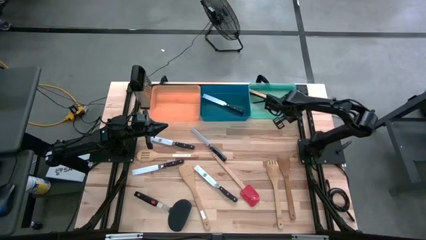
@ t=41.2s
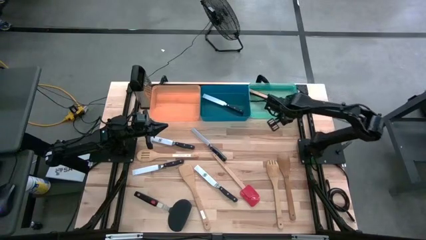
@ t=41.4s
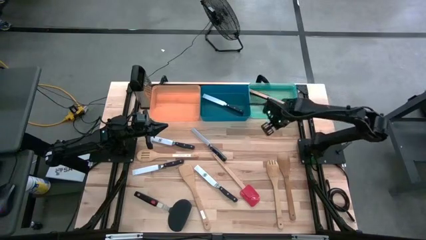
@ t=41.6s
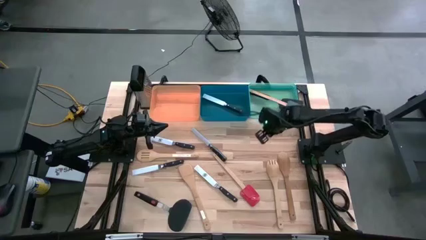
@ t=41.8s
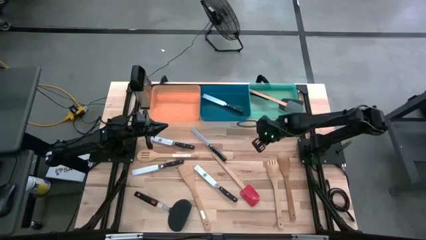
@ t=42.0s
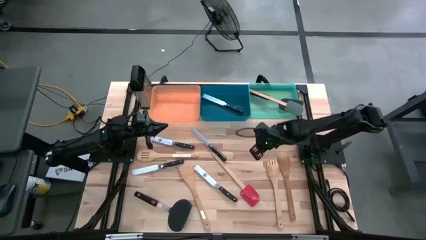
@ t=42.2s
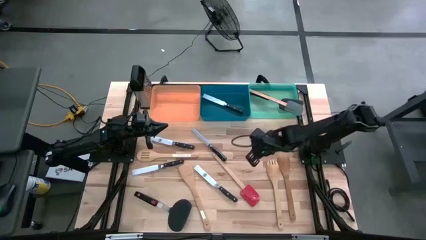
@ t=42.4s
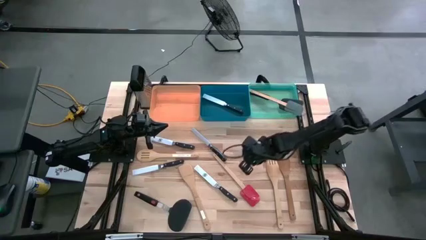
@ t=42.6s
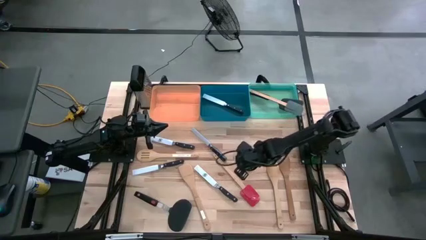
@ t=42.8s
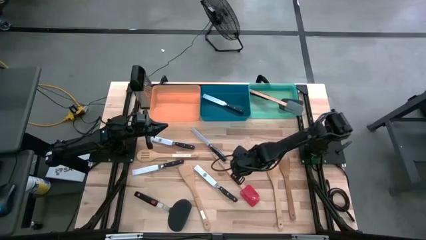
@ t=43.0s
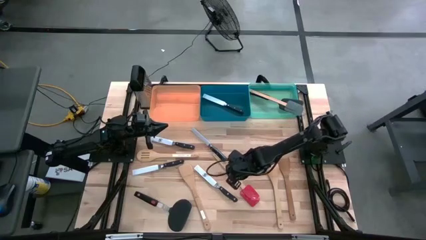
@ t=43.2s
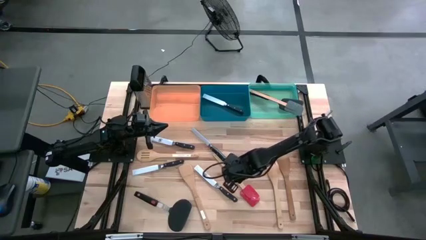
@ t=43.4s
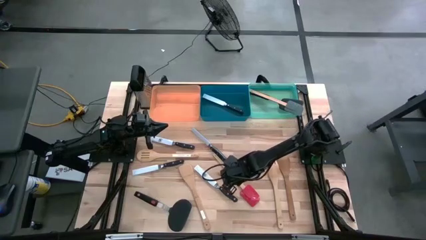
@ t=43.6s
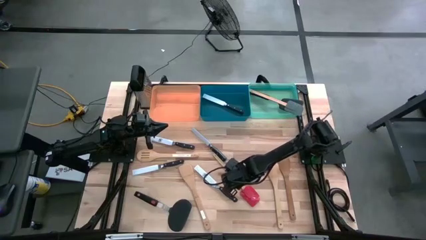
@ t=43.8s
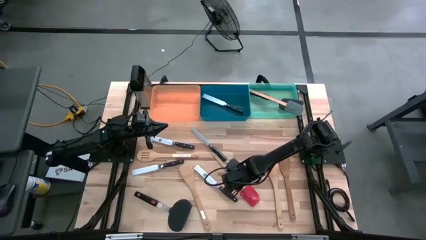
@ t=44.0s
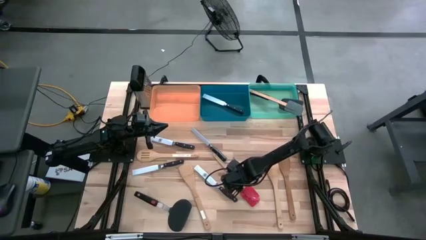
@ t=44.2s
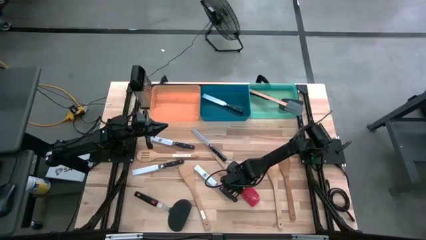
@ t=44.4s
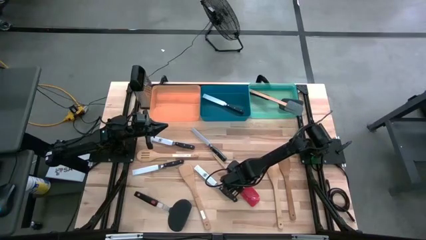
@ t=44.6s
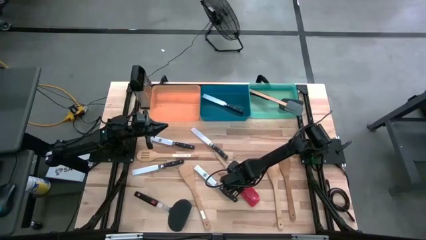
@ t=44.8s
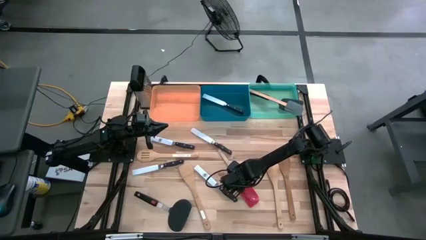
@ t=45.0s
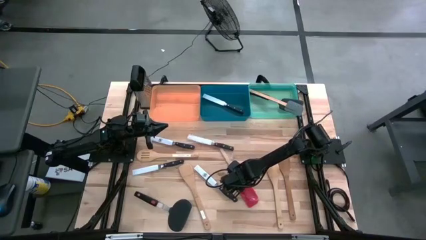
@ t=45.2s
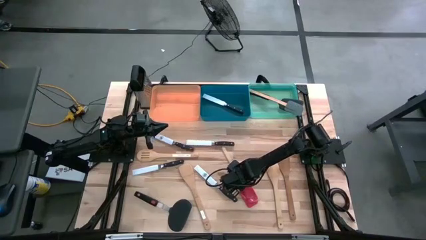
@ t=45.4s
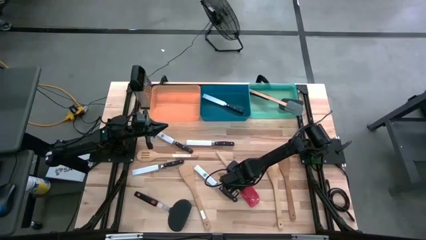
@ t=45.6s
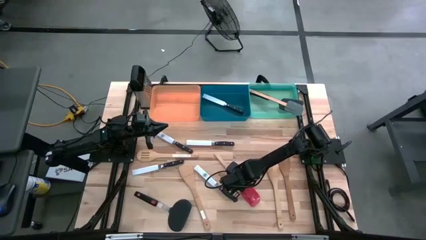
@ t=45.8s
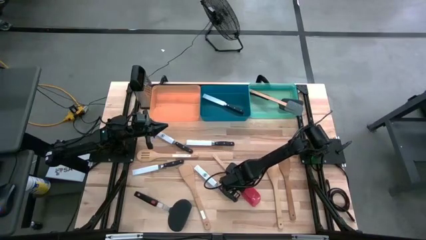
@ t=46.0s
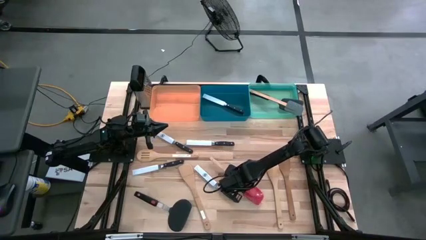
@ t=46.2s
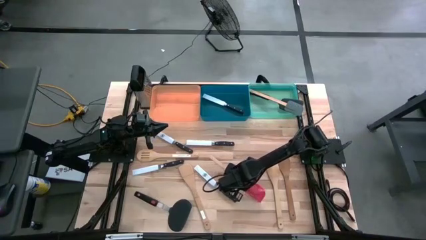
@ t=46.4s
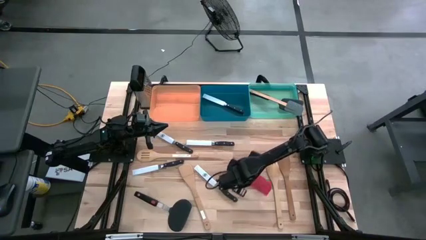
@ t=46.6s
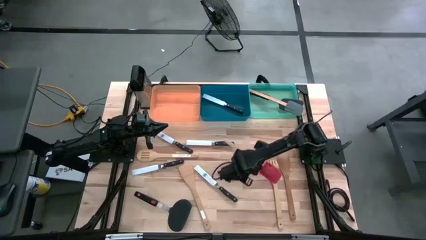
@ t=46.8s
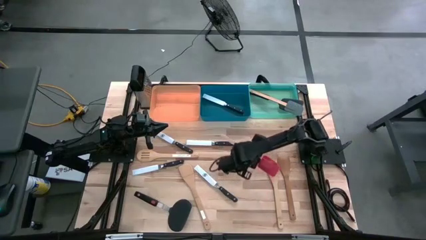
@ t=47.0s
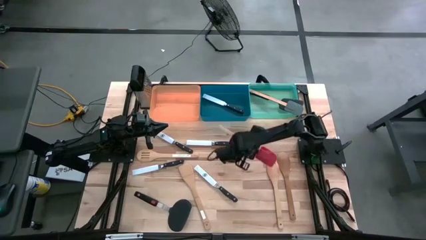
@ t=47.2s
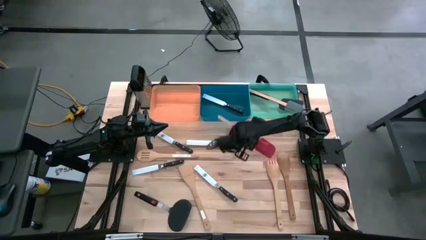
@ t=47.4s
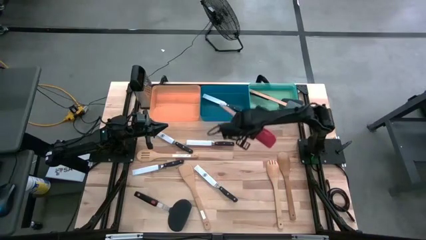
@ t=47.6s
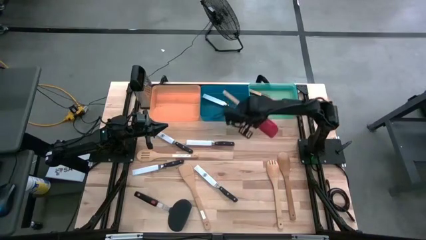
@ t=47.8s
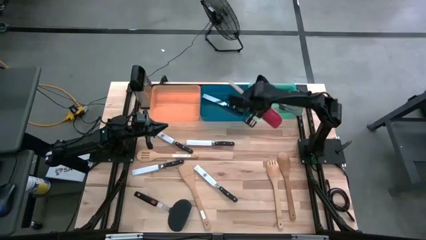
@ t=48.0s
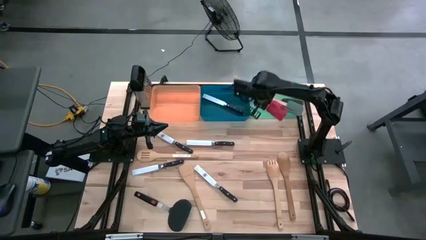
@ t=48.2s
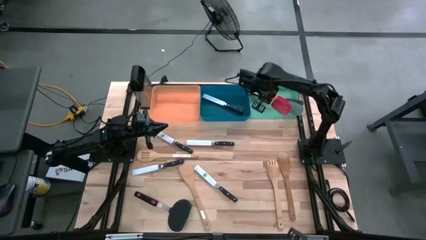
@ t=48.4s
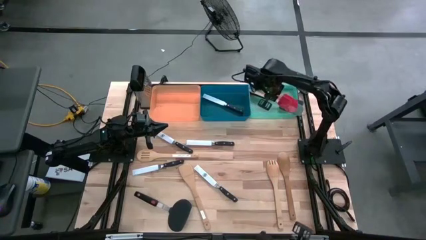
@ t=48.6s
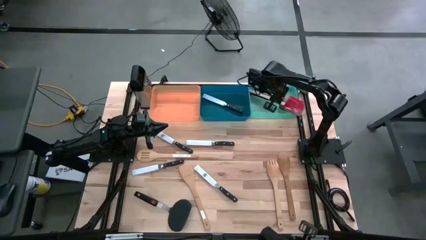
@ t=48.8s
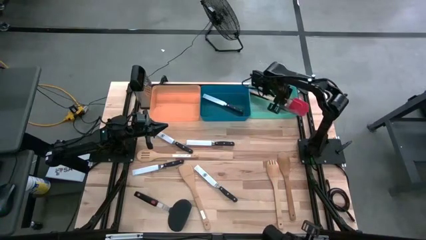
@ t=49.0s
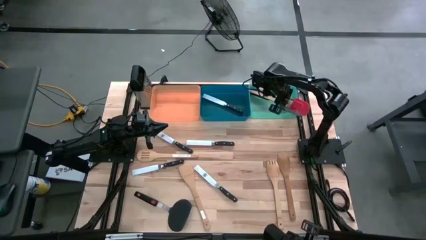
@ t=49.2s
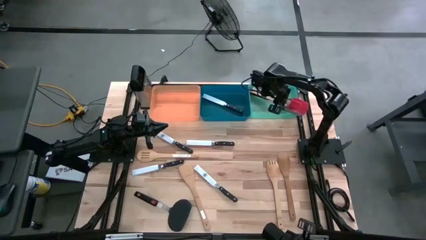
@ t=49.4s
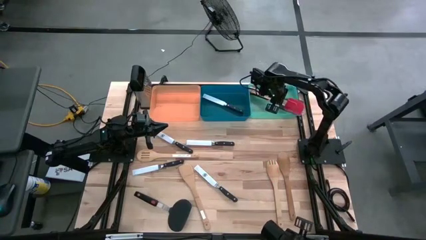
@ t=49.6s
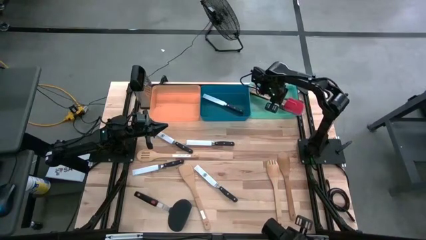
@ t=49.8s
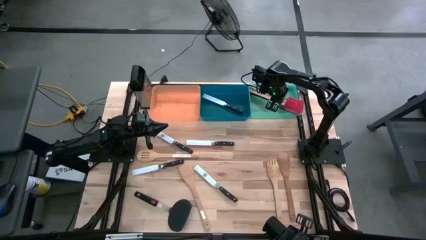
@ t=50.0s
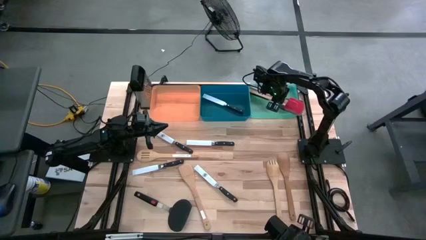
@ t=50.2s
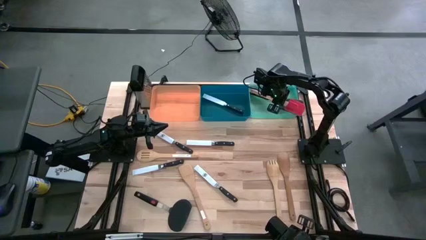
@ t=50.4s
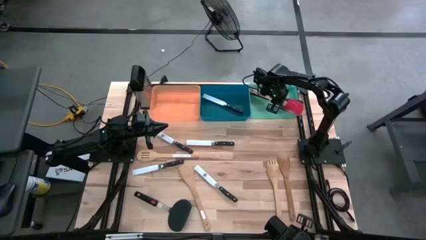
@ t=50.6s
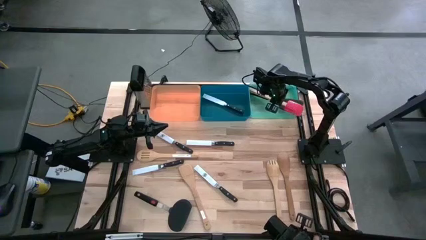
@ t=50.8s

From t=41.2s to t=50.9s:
Task: Pick & Place Kitchen Items
Put the red spatula into the green bin

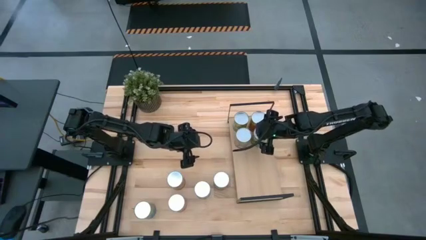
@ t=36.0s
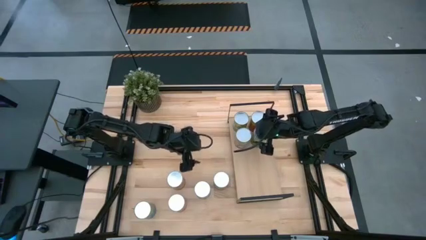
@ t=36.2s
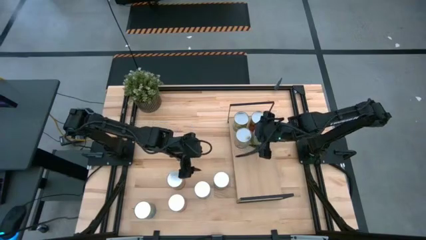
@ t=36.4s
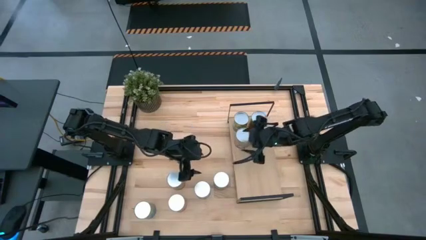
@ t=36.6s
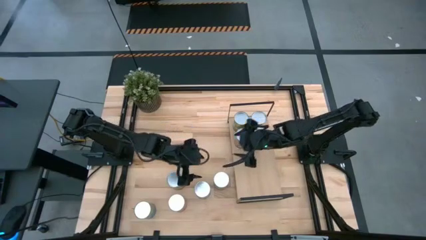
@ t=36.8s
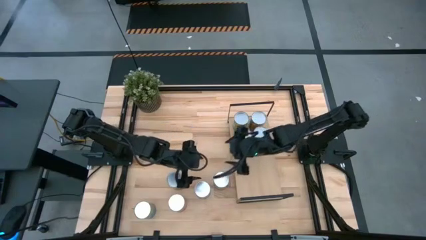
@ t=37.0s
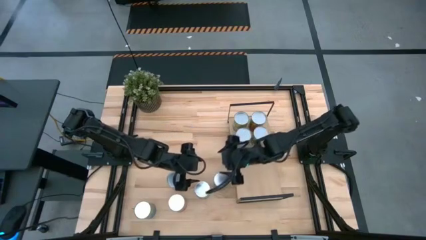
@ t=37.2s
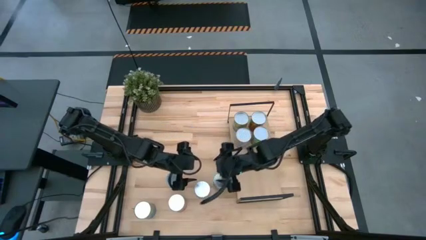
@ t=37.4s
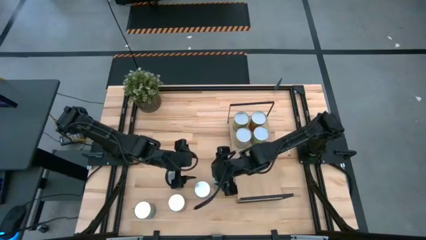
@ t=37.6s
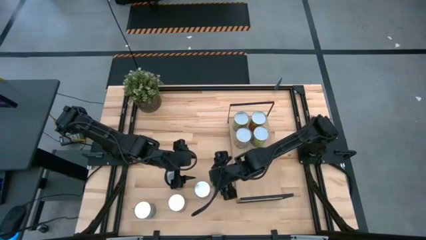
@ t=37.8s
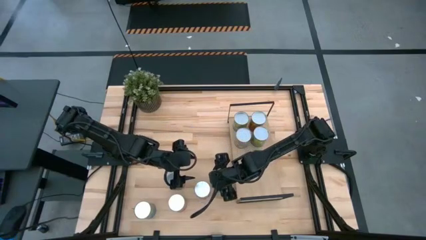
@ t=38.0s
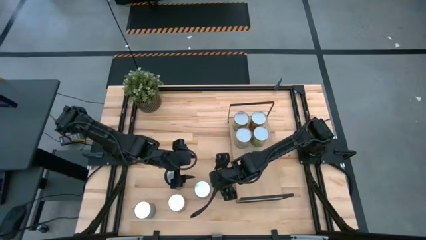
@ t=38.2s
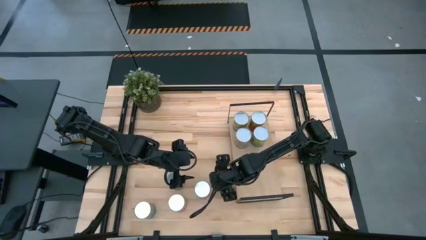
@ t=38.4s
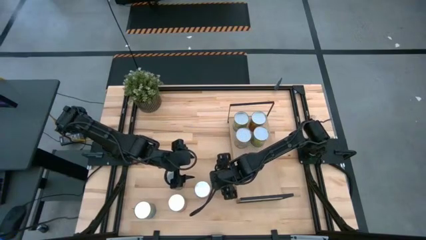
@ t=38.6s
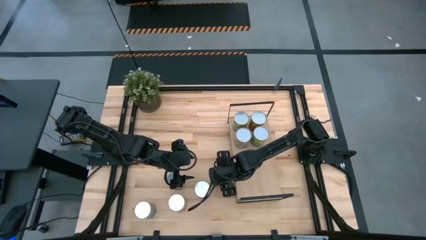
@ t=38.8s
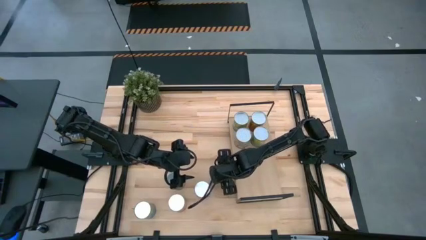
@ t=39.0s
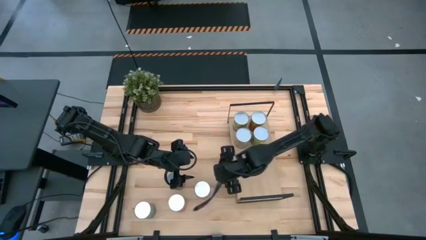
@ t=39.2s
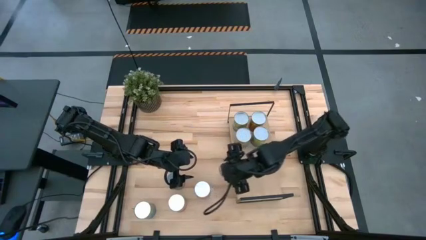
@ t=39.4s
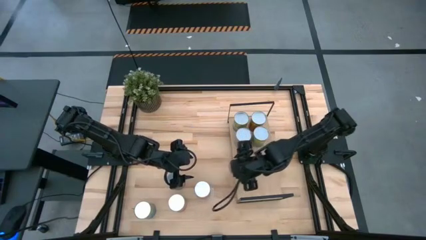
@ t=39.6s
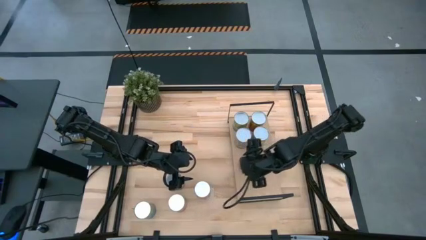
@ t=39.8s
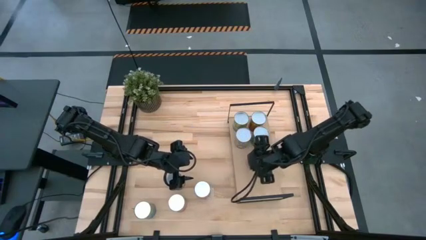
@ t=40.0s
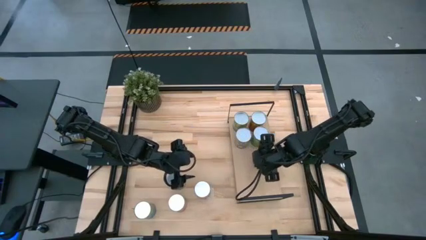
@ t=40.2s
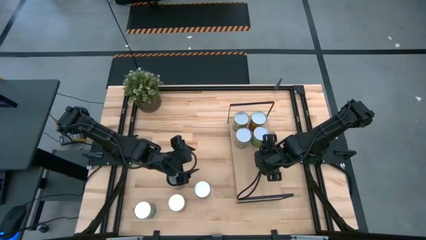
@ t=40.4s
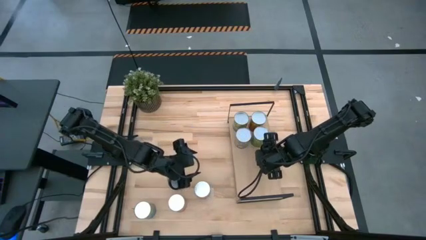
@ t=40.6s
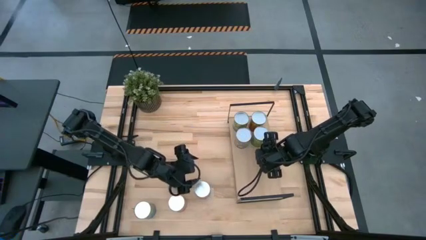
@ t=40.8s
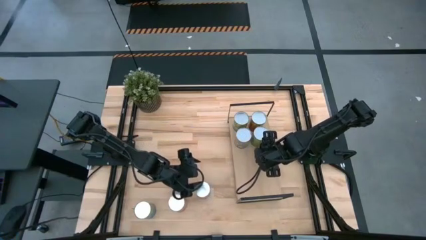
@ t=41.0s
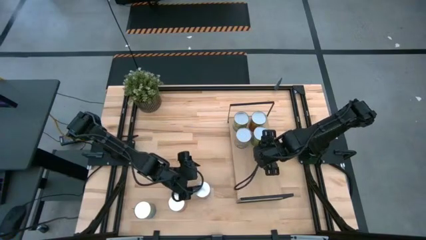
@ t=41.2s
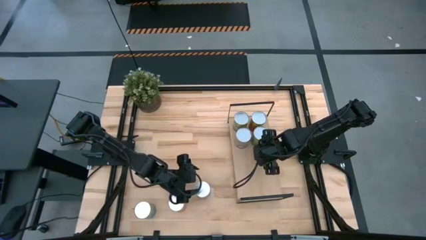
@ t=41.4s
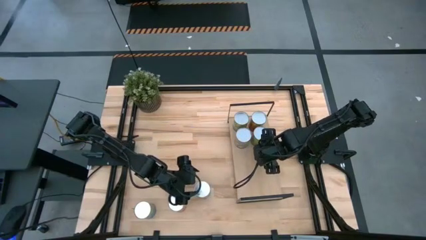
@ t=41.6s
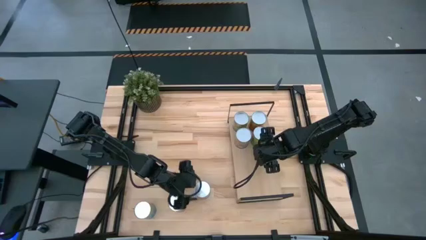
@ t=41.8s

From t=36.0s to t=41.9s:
Task: Pick and place cans onto a shelf
Put the canned oranges on the shelf
